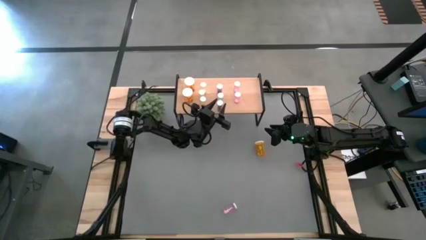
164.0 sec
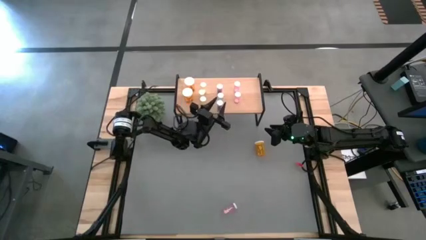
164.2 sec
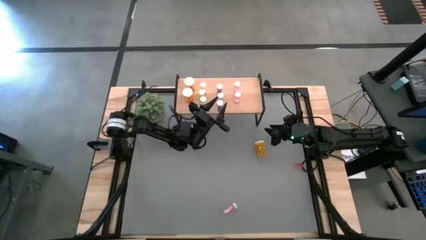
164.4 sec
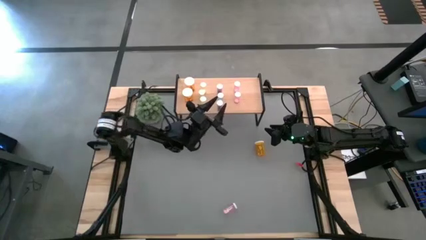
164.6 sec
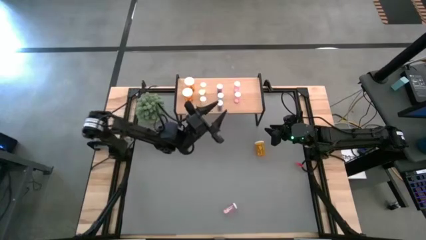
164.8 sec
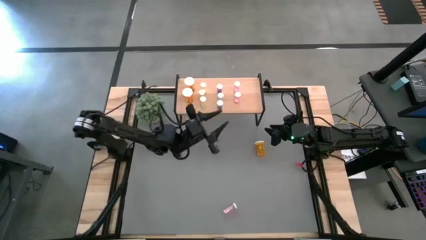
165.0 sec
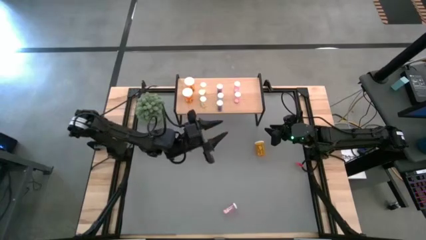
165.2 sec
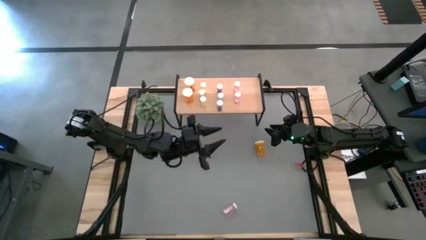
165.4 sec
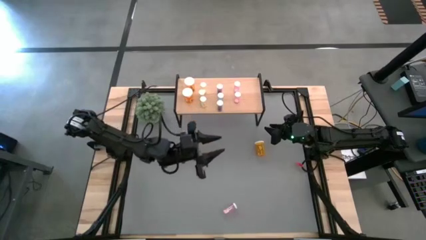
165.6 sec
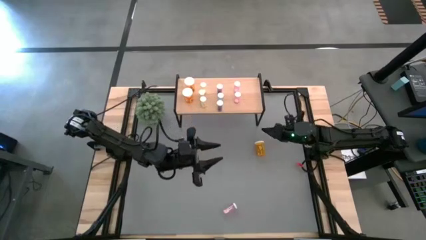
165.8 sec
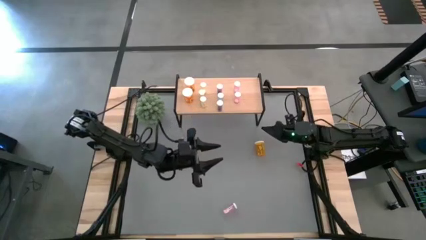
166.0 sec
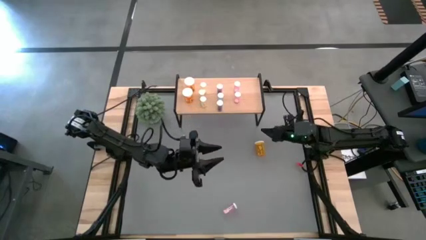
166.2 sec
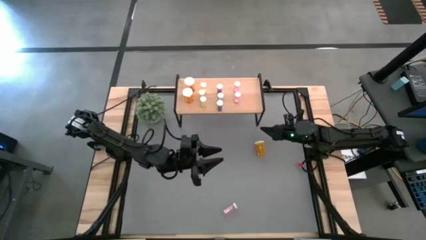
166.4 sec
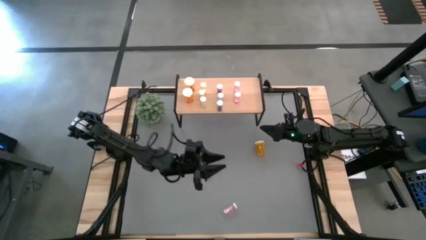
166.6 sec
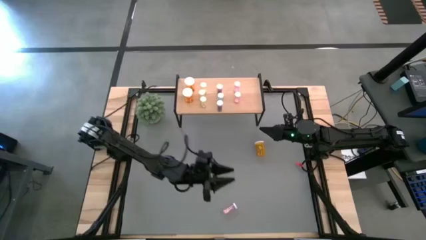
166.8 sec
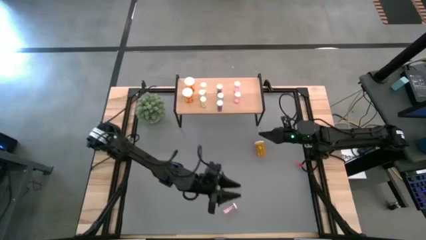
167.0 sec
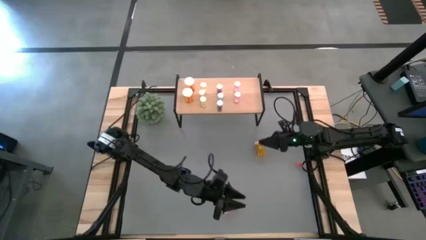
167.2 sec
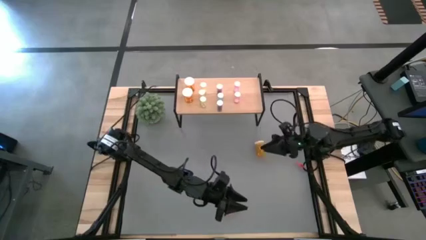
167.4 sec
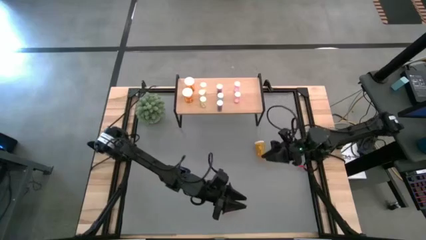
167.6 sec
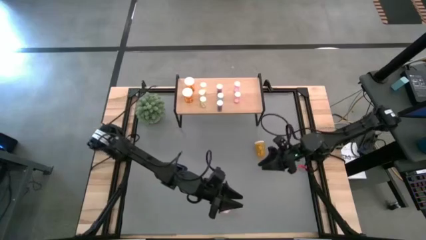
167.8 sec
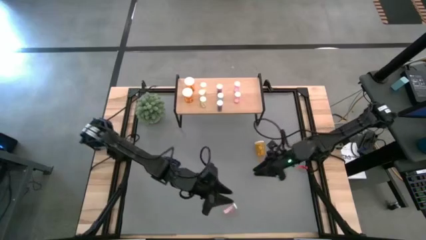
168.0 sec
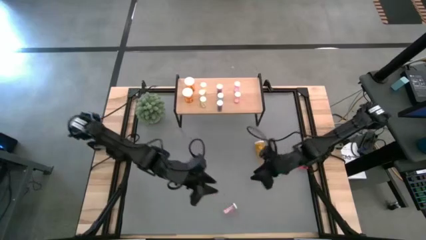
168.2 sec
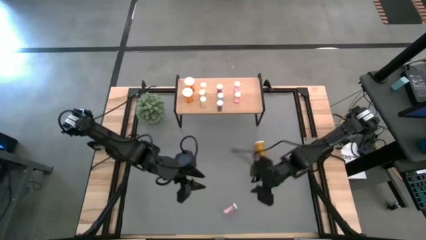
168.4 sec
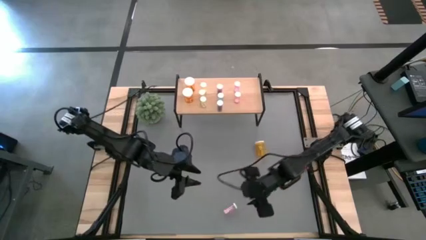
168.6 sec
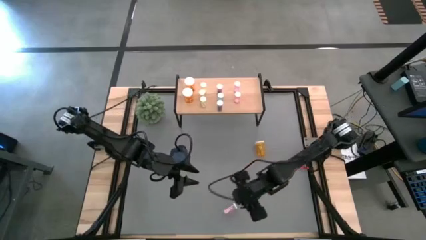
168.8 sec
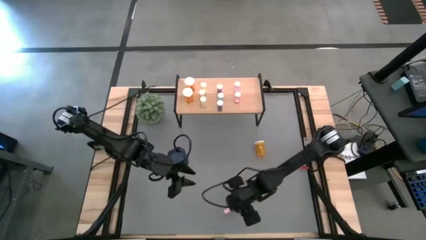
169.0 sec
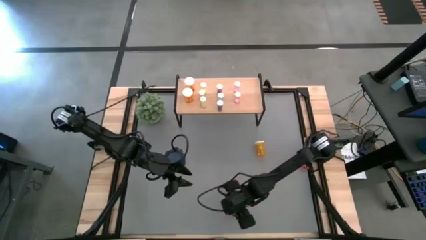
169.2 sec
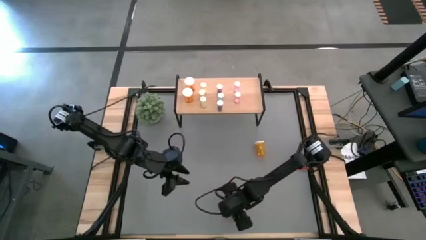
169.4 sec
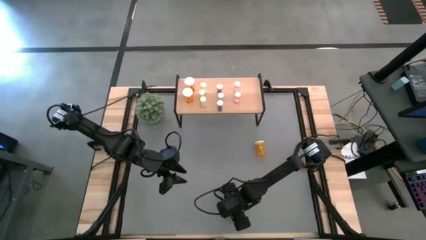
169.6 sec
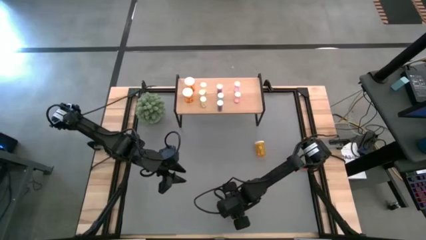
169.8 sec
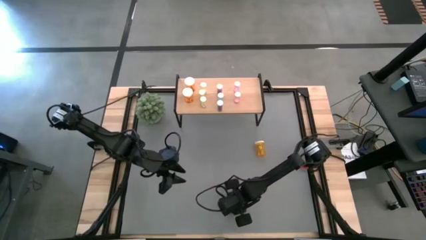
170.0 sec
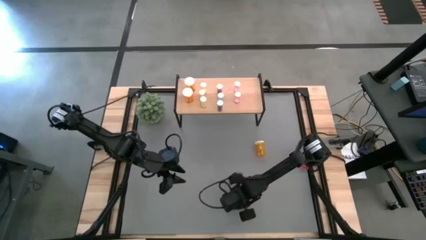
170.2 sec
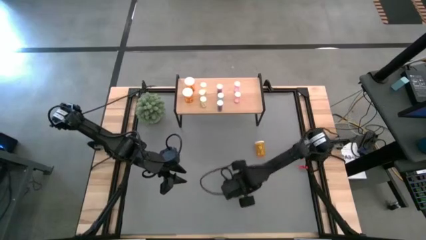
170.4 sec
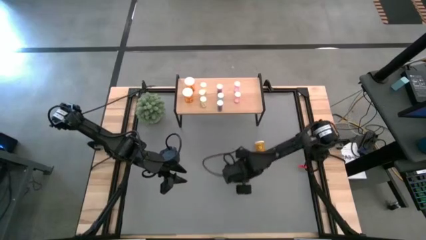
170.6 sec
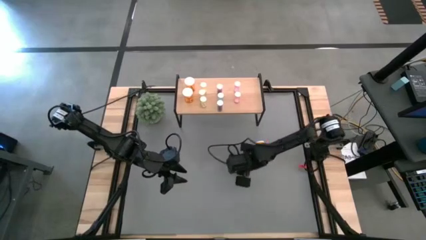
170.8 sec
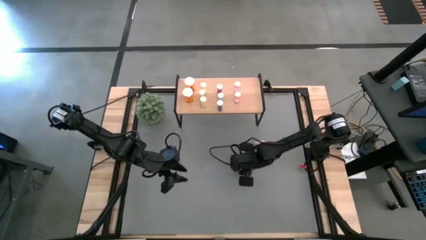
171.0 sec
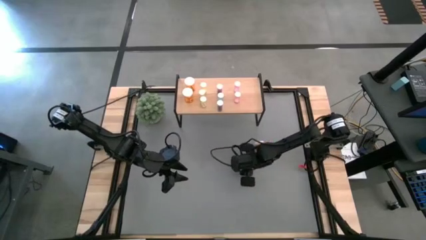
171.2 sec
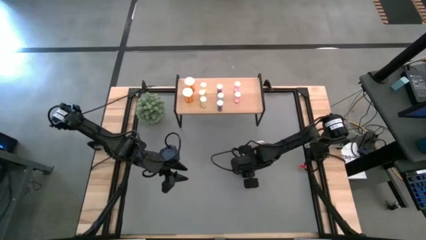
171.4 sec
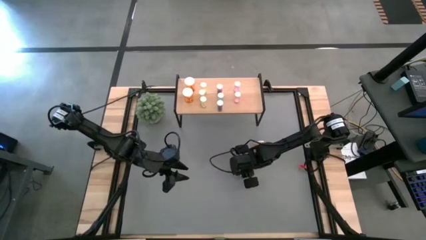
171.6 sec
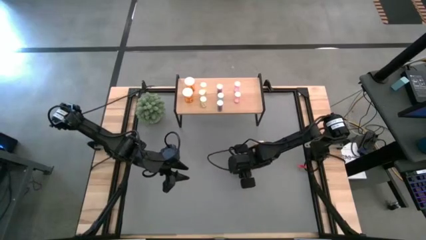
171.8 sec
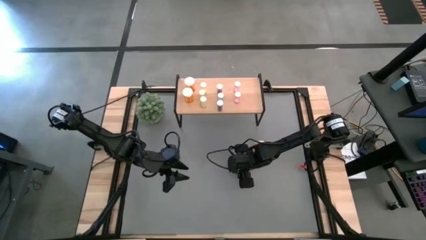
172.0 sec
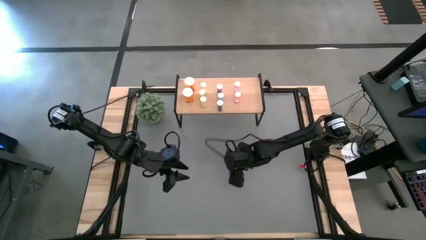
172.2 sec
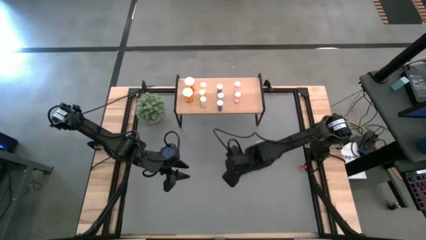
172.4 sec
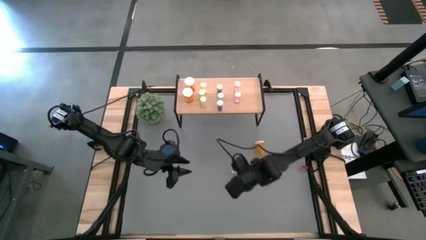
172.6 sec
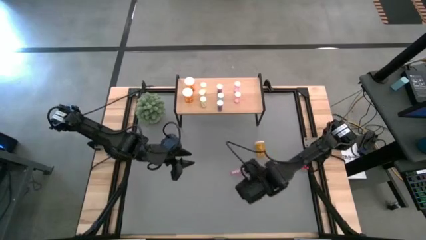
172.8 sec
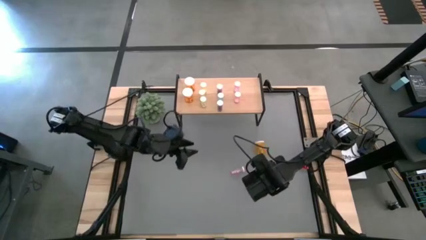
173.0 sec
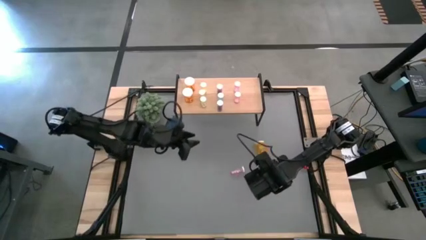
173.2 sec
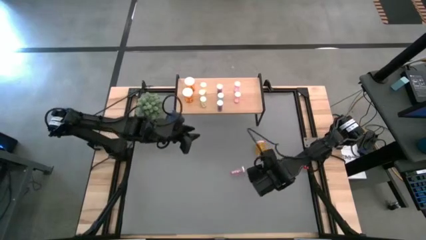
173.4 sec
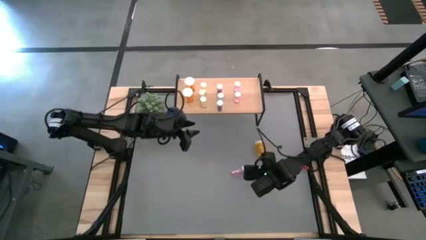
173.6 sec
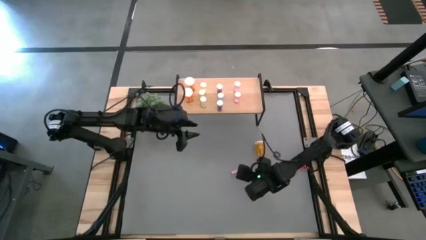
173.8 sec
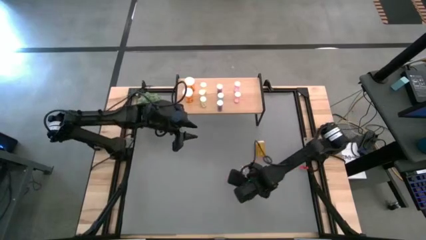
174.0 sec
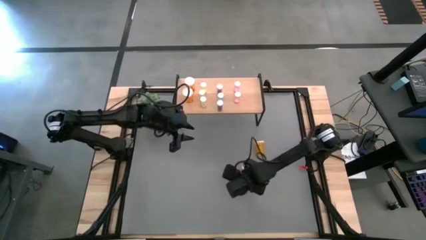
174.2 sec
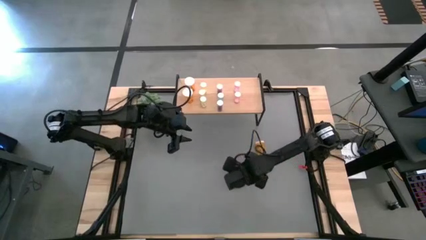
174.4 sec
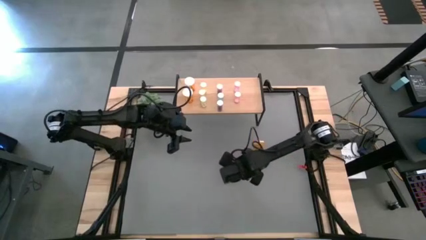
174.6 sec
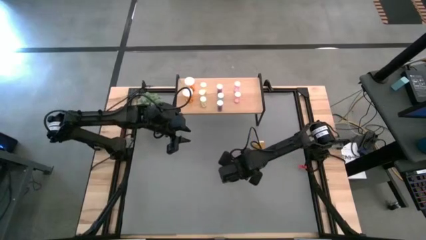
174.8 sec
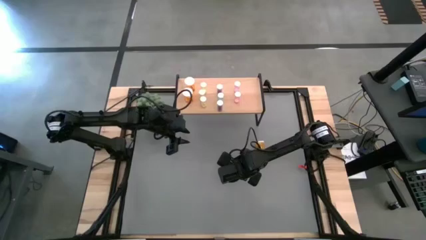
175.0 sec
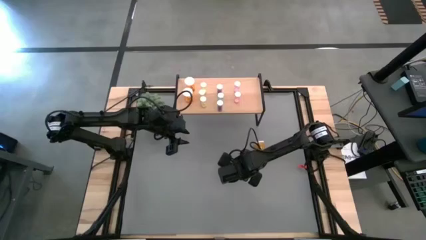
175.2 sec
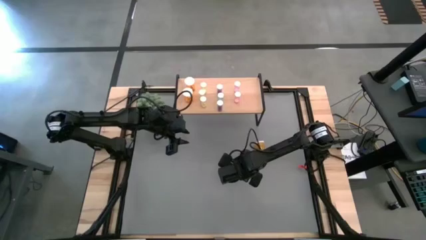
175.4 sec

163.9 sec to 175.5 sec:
Task: Pick and place medicine bottles onto shelf by color
Put the pink pill bottle on the shelf aligned with the other pink pill bottles

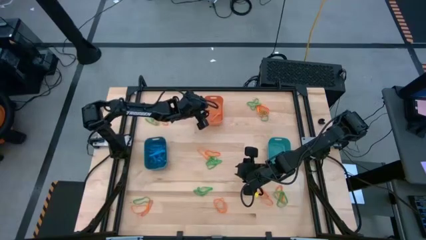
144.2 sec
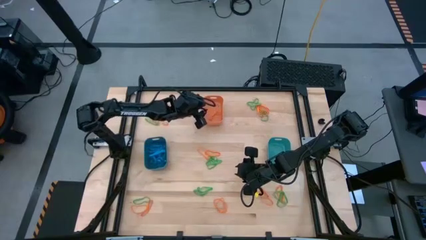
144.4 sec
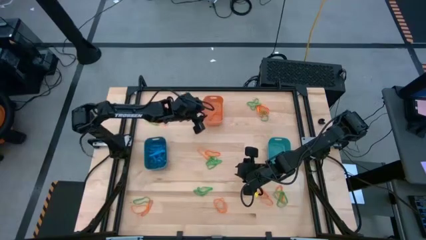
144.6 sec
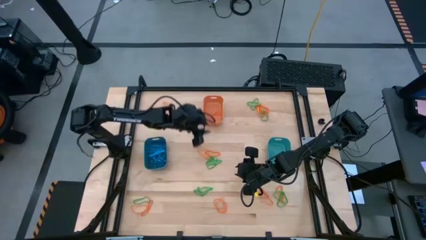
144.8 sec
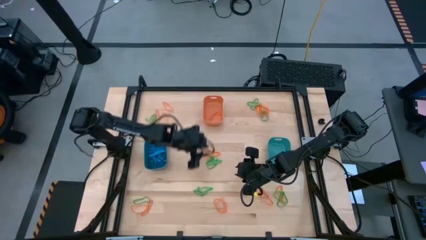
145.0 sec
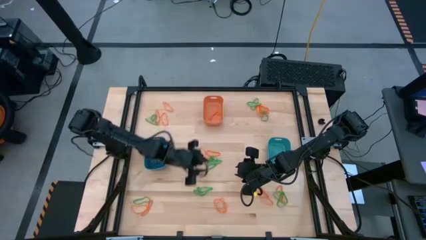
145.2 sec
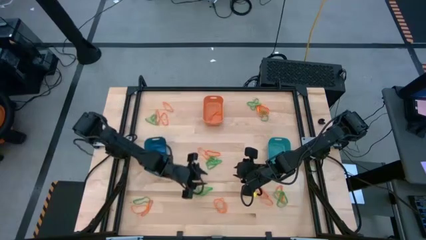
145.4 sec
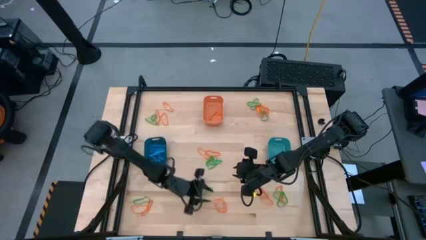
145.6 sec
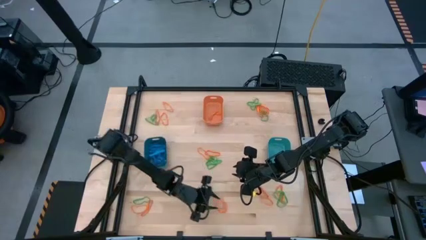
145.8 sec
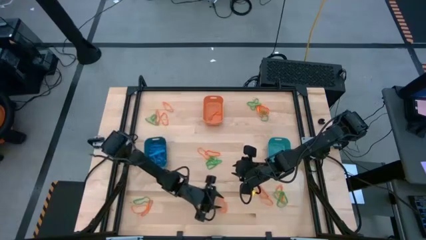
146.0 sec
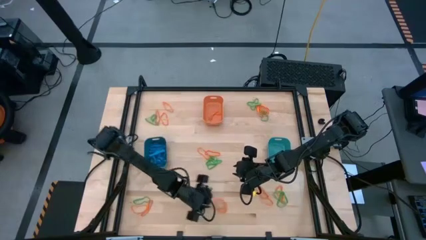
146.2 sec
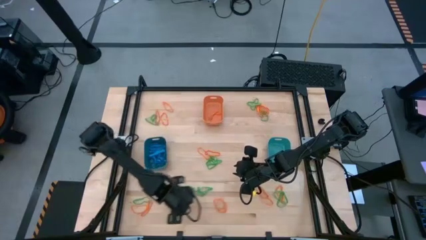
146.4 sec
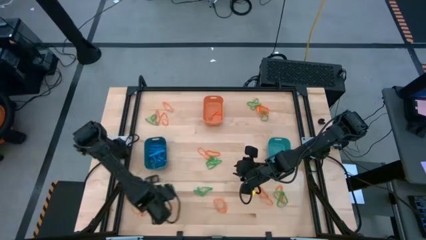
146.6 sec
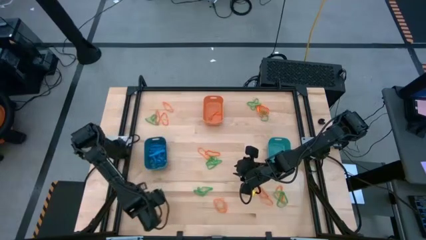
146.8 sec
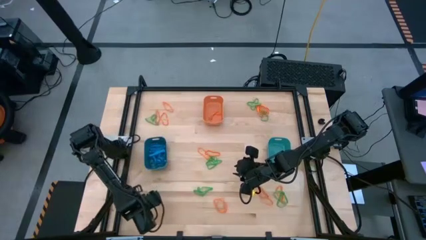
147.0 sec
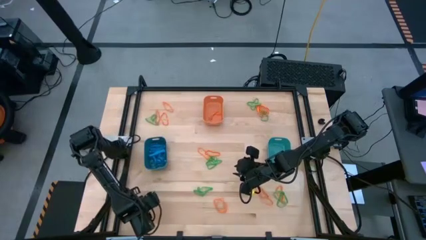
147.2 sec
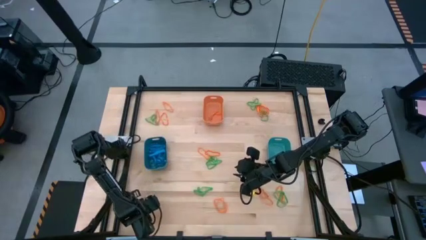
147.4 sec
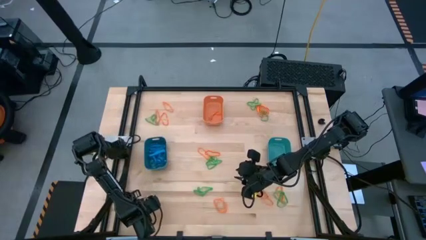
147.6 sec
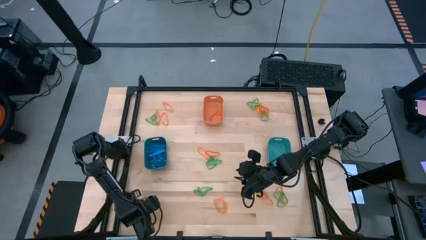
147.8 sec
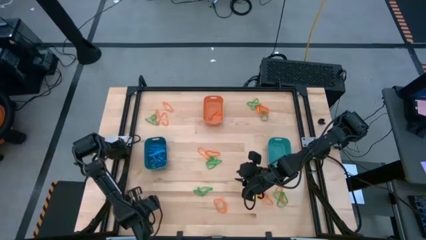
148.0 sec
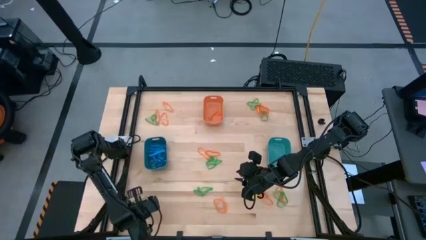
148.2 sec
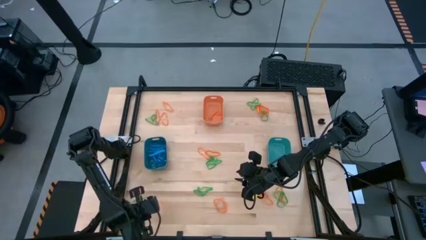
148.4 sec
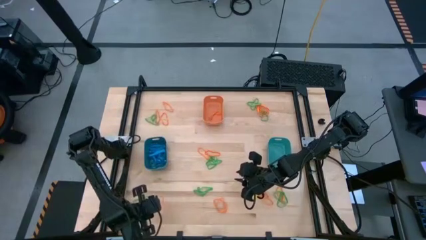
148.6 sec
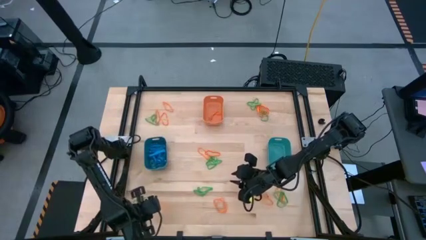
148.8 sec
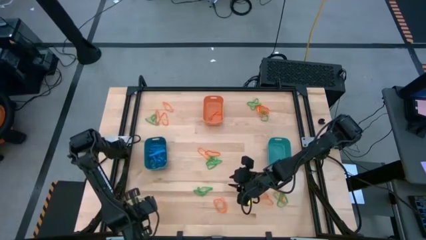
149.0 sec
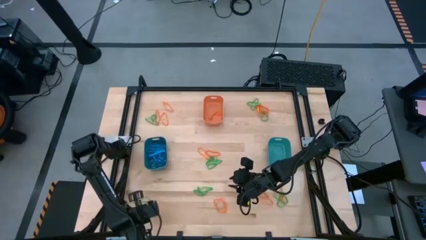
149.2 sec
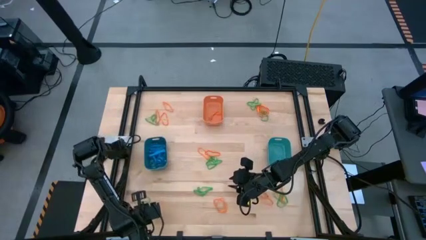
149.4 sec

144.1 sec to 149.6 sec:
Task: Sort rubber bands into baskets
Put the orange rubber band into the orange bin
